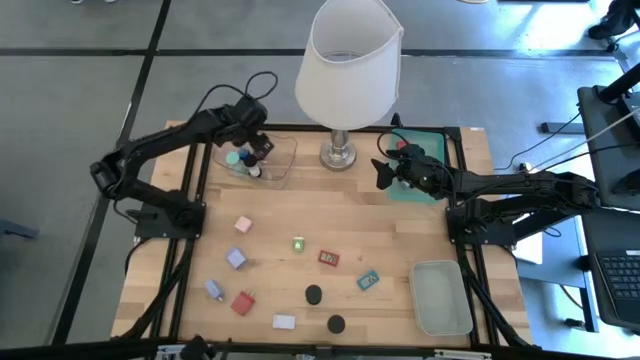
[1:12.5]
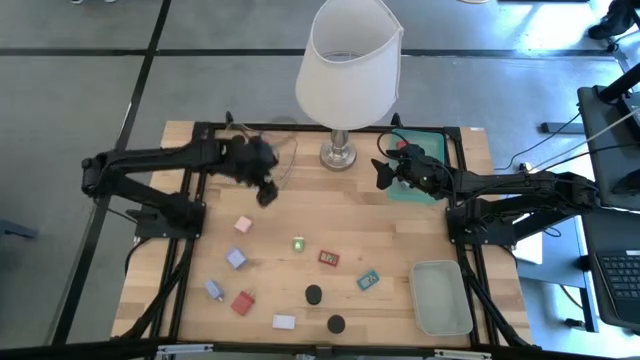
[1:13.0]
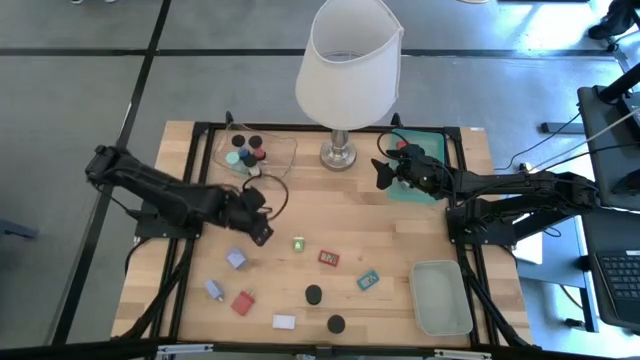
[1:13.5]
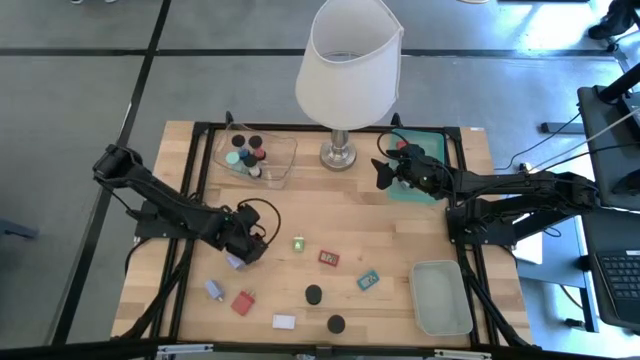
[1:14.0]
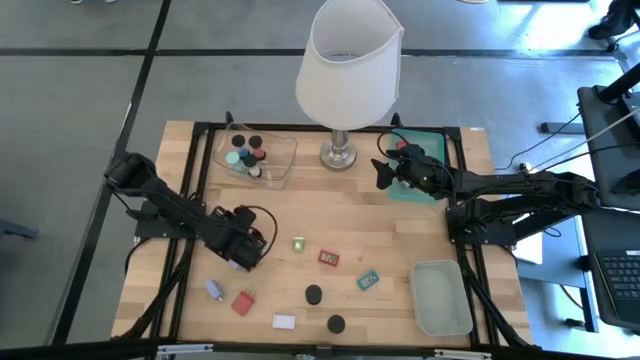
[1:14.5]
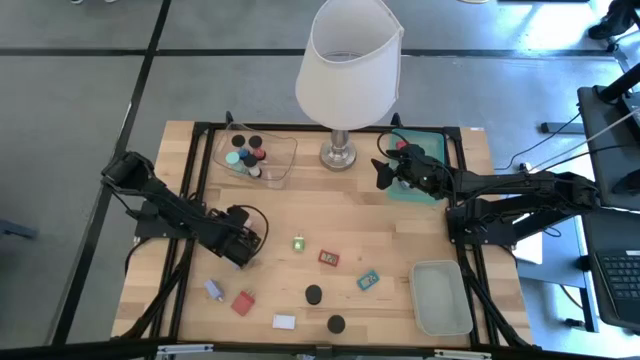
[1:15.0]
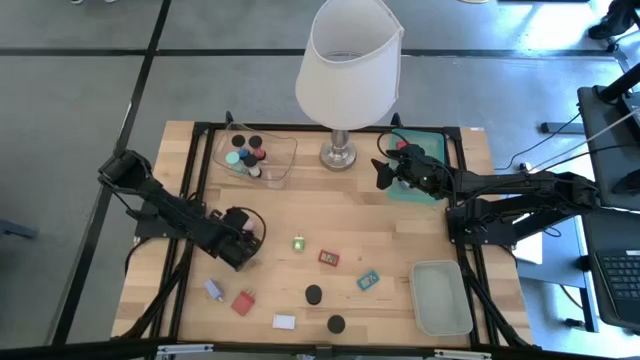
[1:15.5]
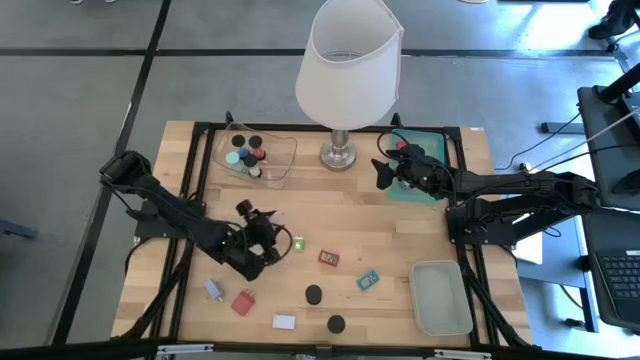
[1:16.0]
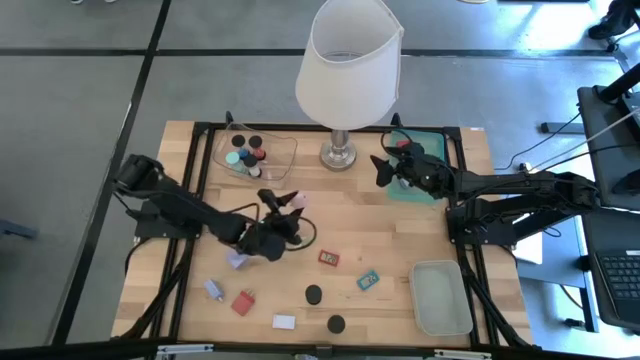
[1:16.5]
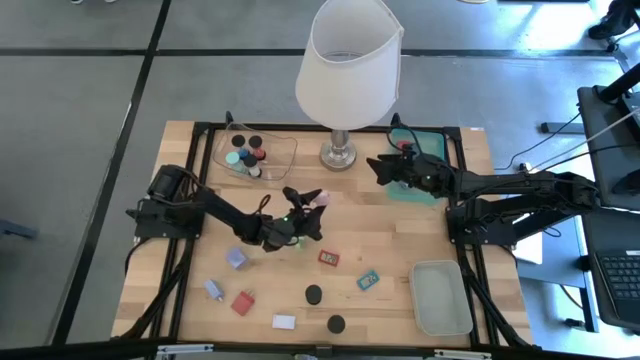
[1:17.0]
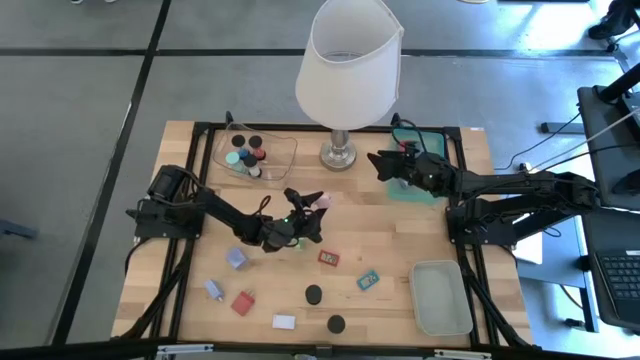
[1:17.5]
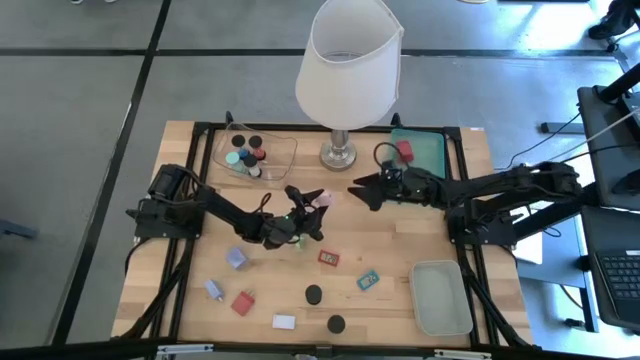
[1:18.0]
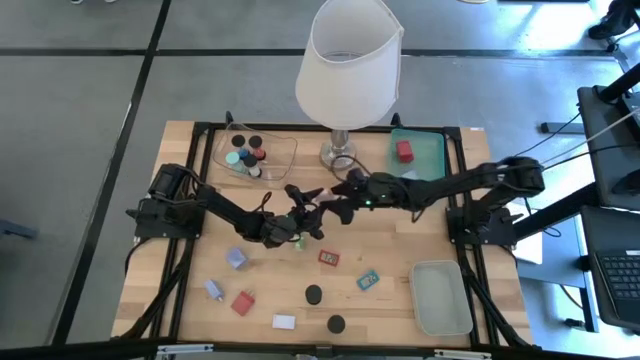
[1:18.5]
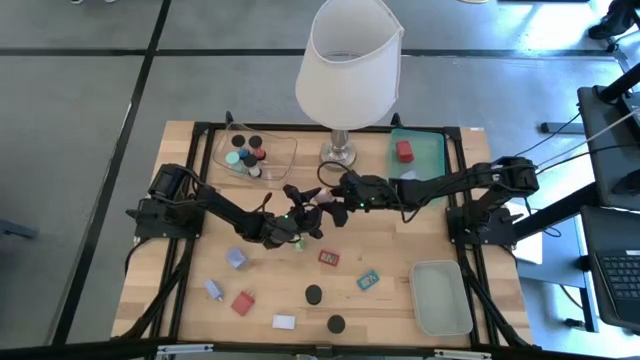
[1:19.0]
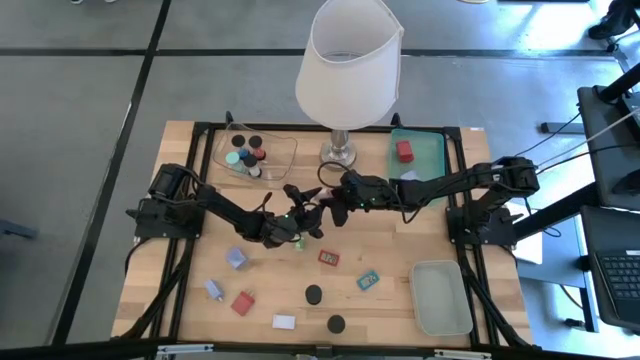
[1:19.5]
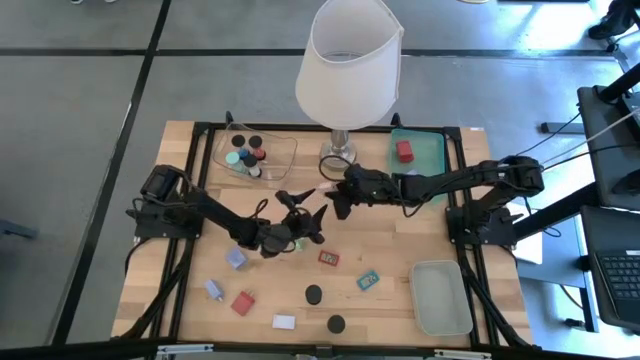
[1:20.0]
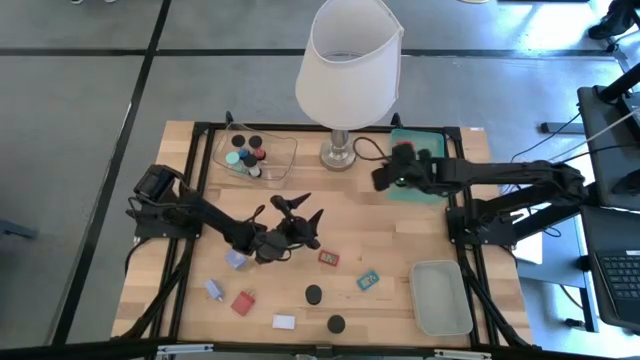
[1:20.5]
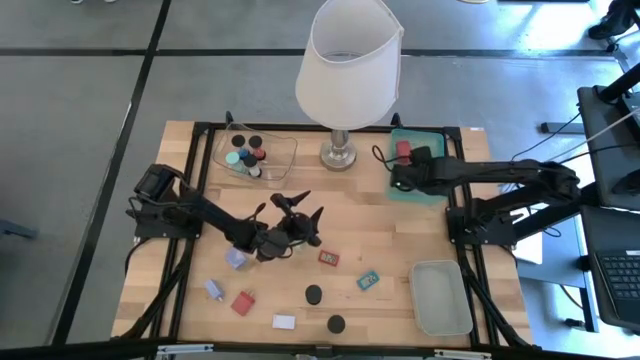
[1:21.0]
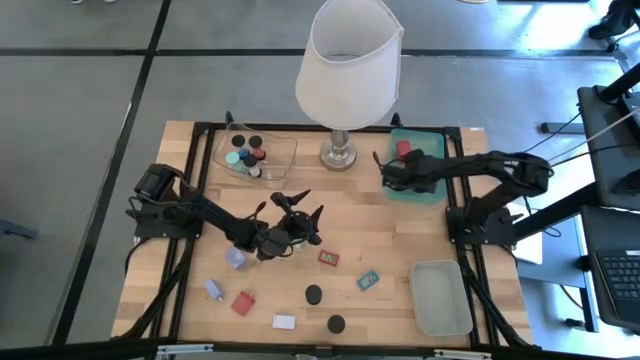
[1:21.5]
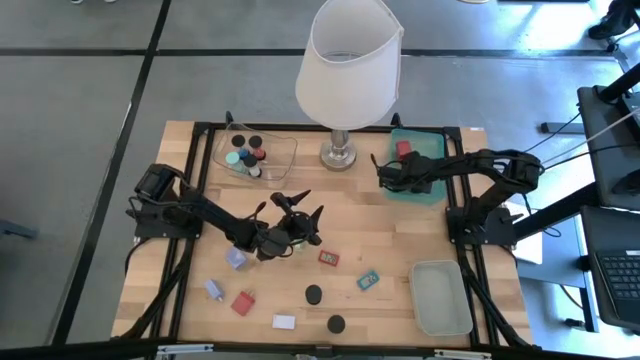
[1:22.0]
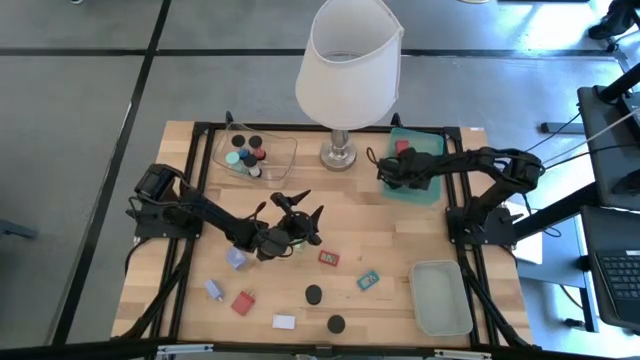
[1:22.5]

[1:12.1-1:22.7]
Task: Pick & Place Office items
Put the pink charger adapter into the green bin

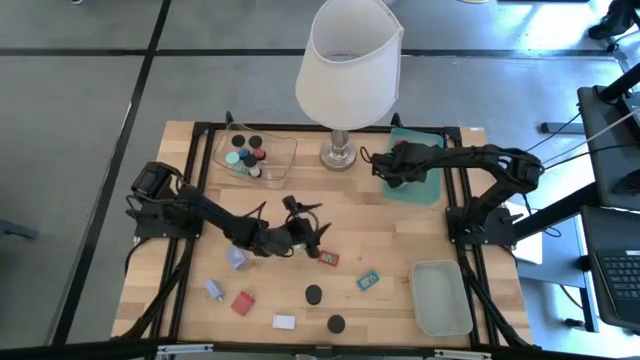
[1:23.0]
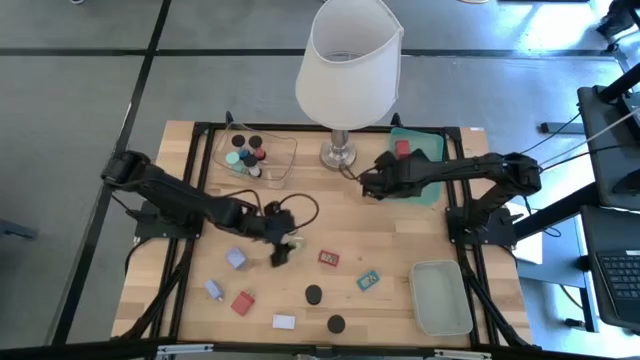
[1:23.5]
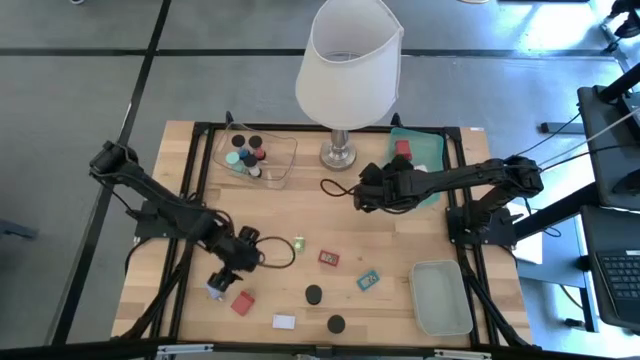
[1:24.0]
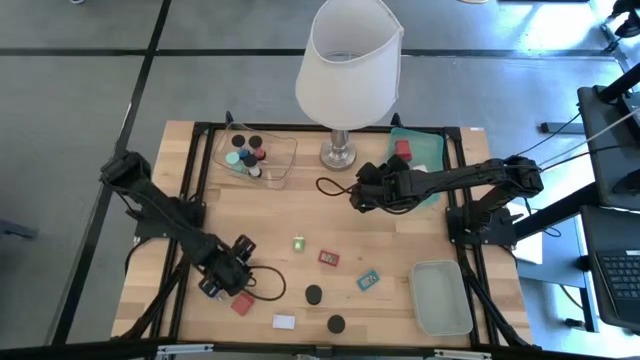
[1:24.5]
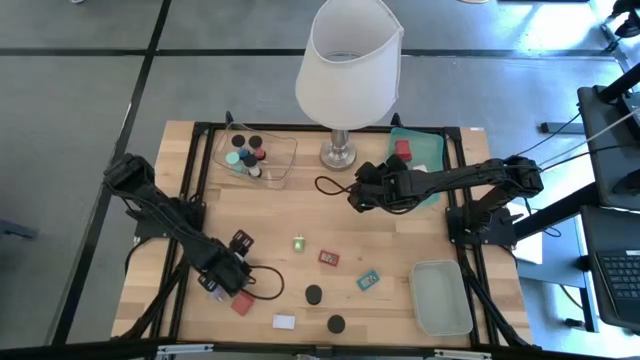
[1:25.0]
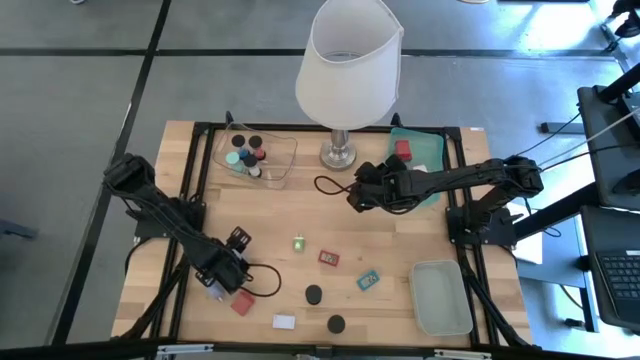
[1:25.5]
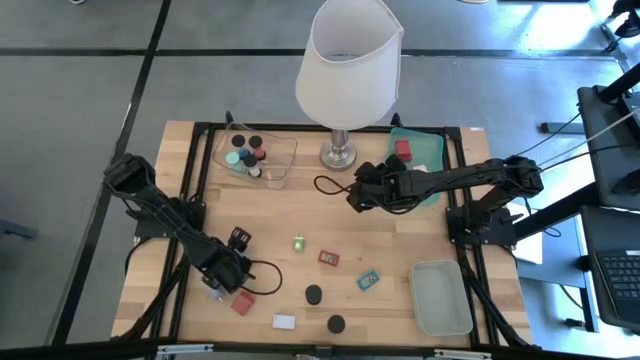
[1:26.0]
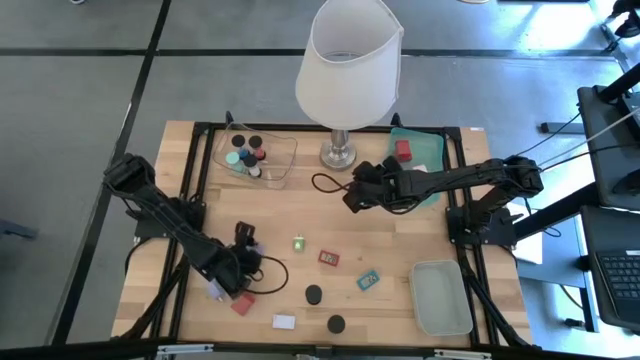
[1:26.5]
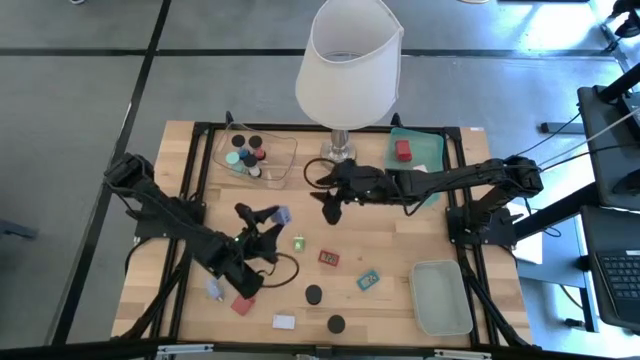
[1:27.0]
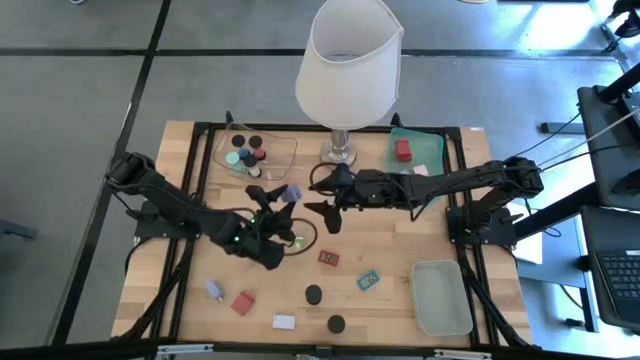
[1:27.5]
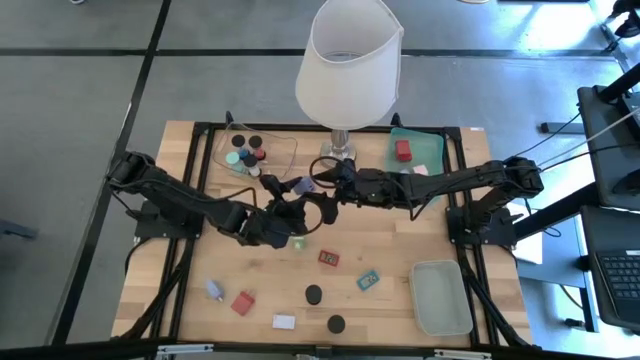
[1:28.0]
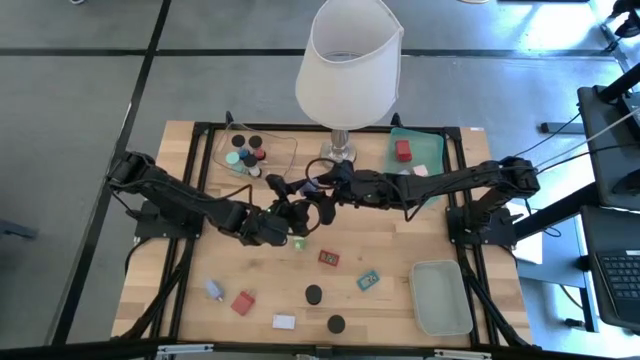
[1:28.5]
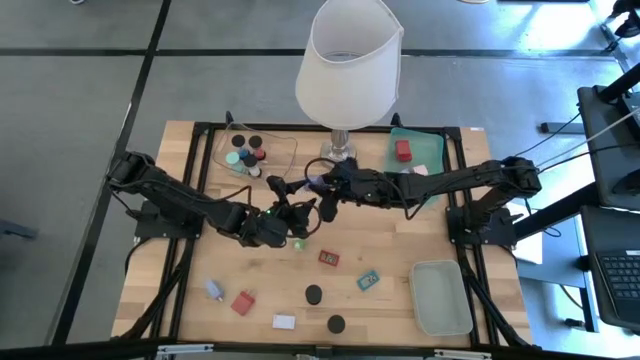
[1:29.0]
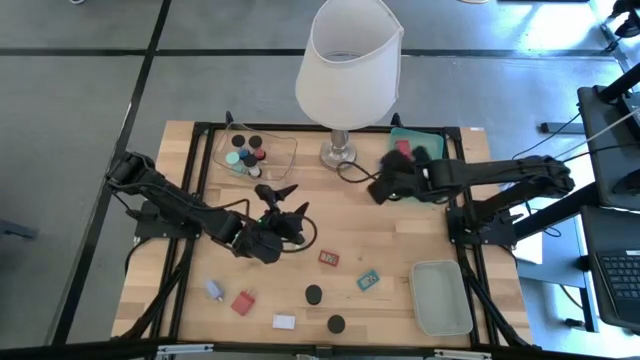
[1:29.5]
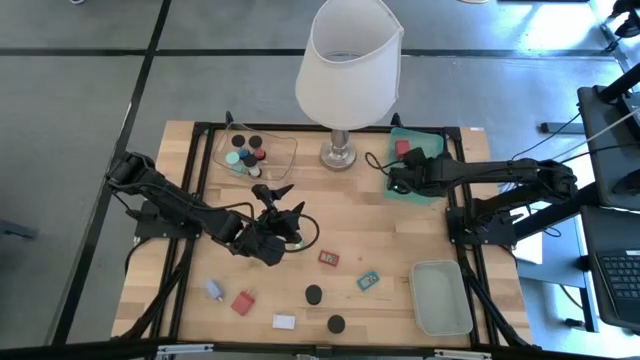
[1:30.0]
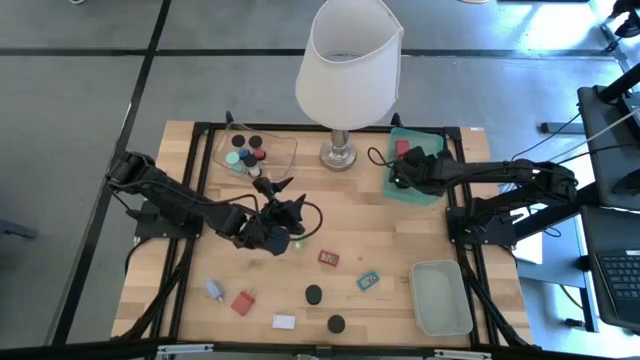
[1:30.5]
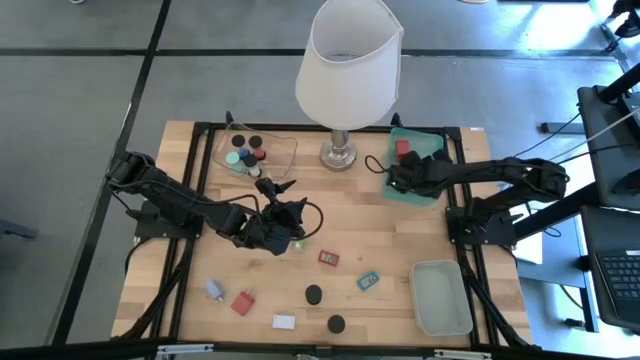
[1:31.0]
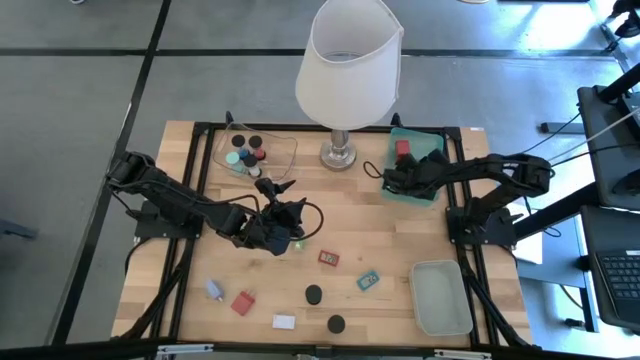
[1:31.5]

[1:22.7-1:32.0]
Put the top purple charger adapter into the green bin

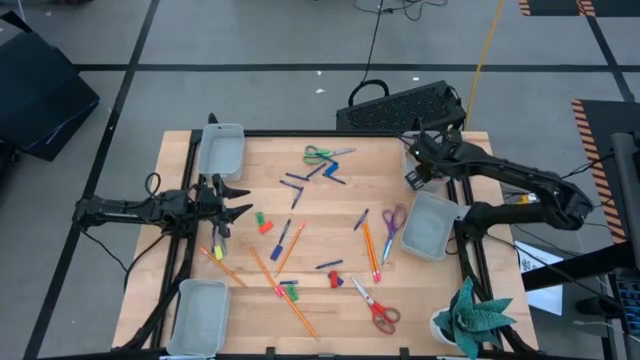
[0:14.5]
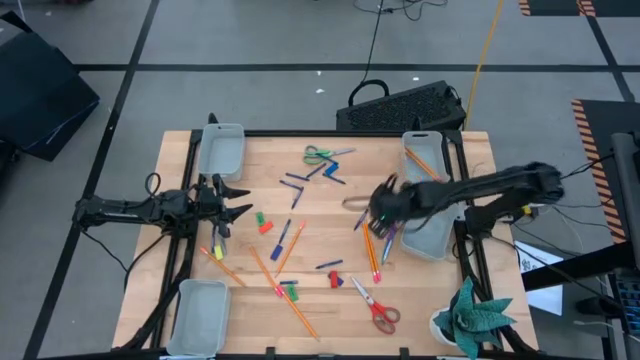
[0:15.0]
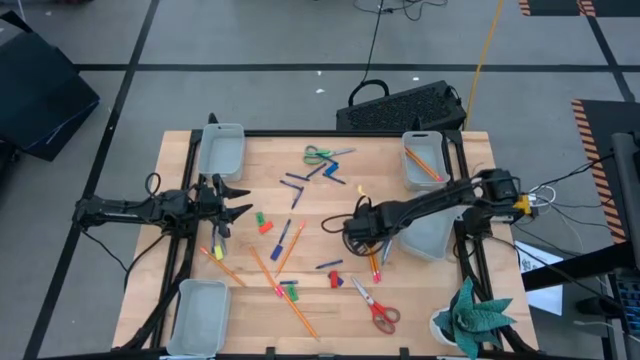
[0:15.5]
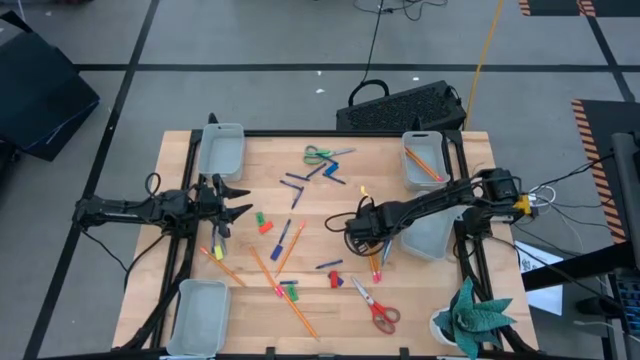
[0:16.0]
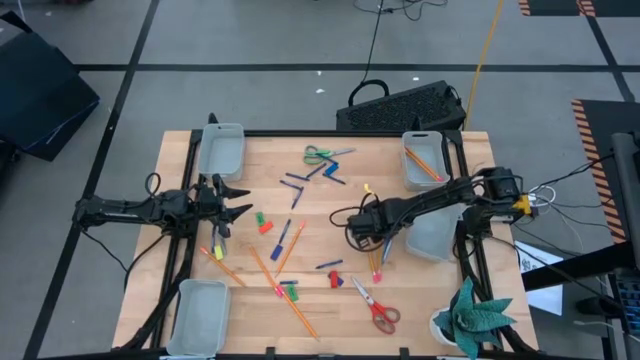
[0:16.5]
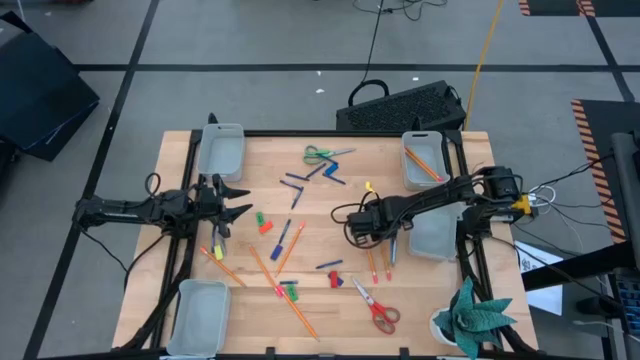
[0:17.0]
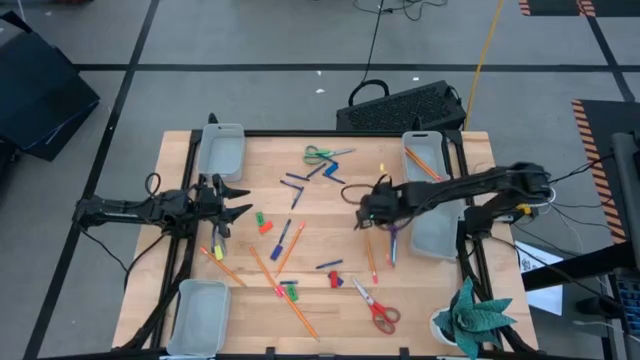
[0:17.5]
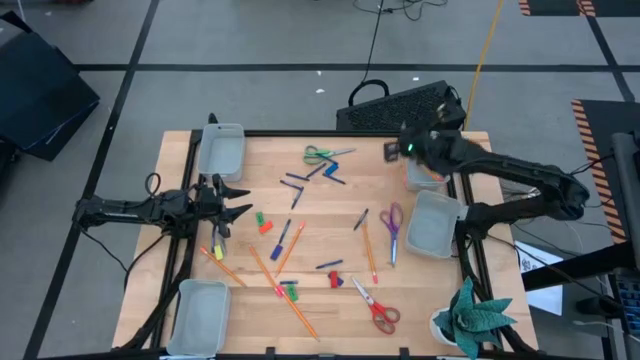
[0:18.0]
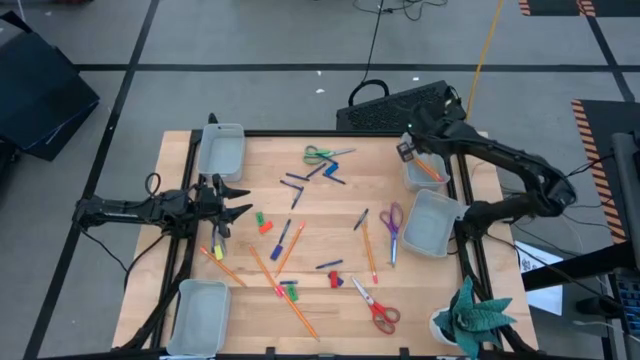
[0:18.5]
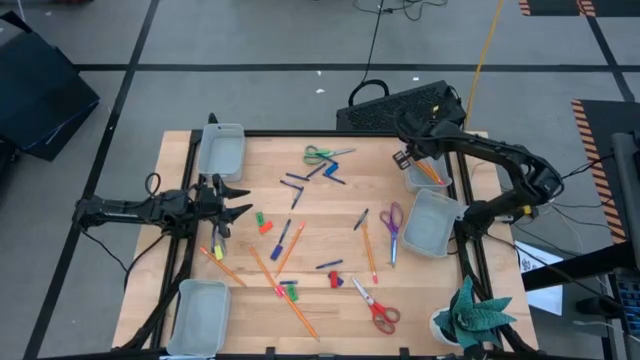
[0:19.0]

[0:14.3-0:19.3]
Task: Sort crayons/erasers/pens/pencils in bins
Put the orange pencil into the top right gray bin
